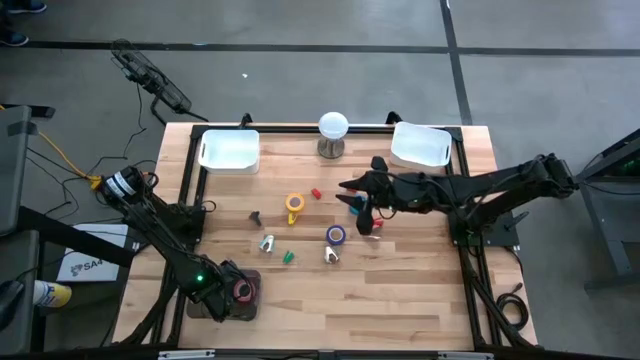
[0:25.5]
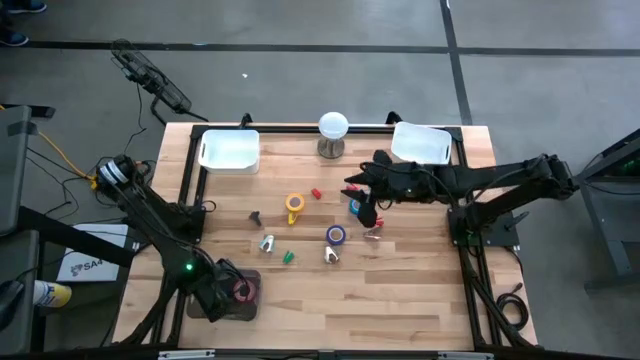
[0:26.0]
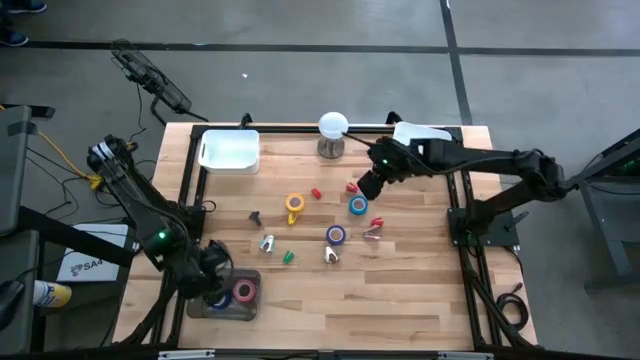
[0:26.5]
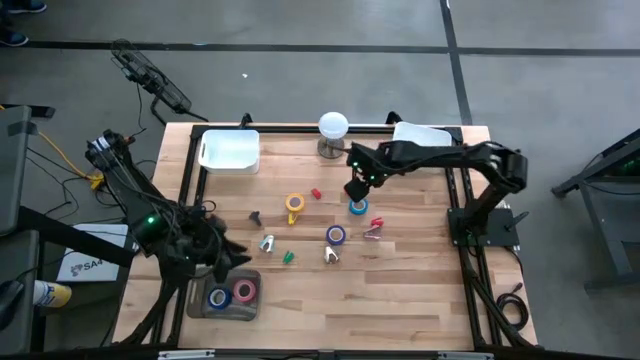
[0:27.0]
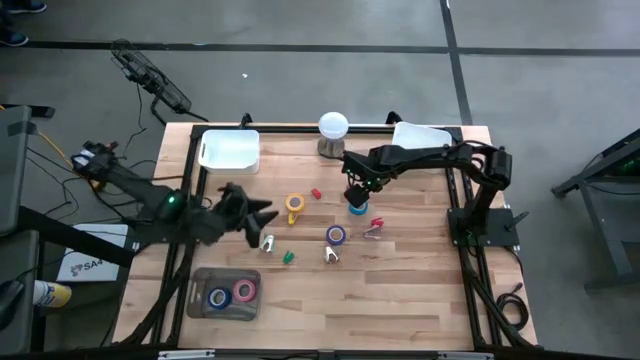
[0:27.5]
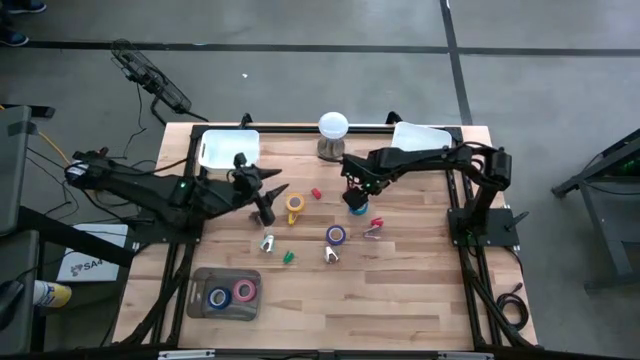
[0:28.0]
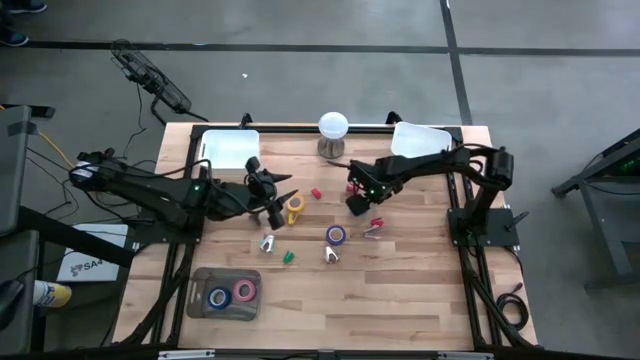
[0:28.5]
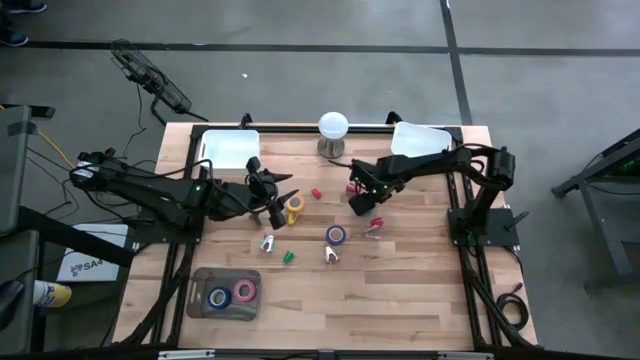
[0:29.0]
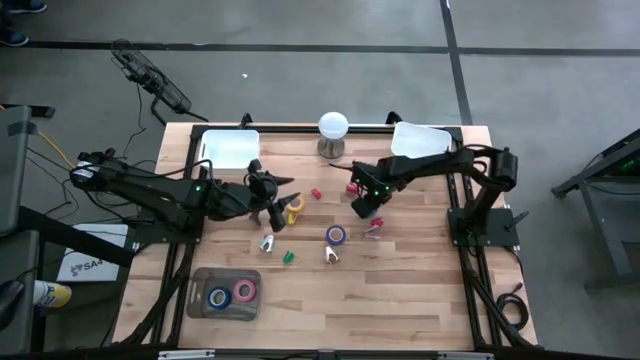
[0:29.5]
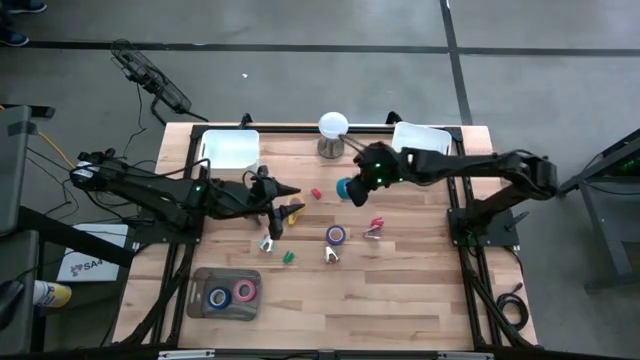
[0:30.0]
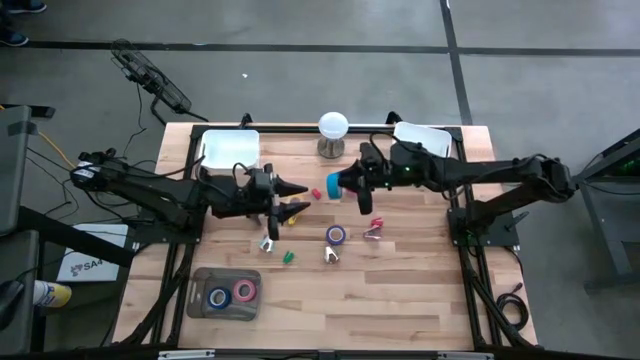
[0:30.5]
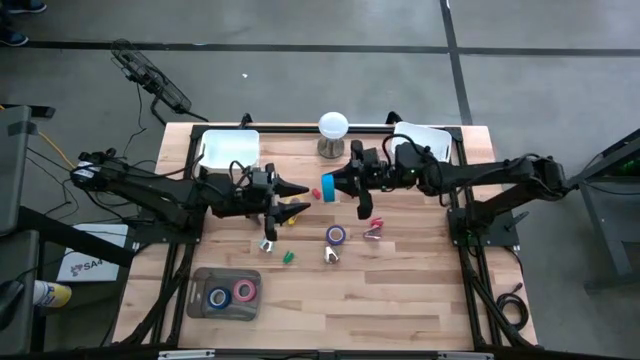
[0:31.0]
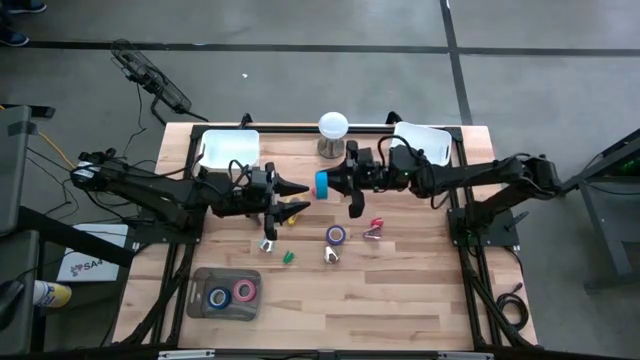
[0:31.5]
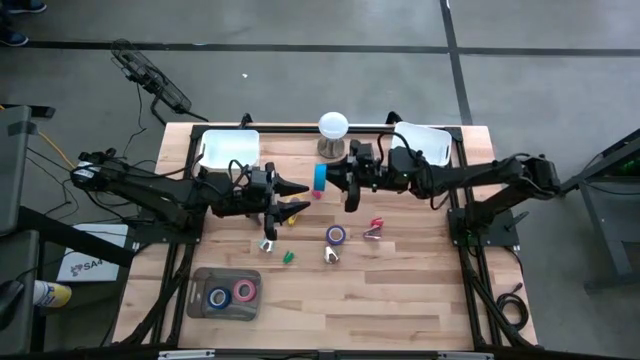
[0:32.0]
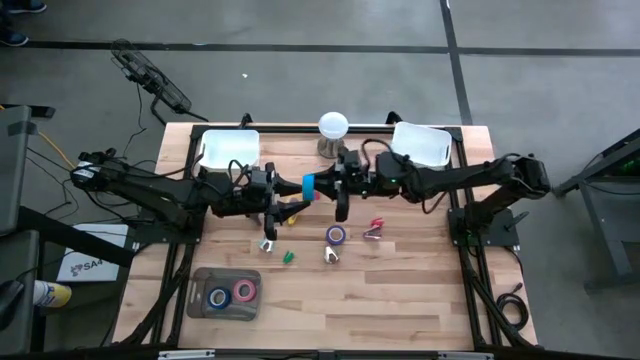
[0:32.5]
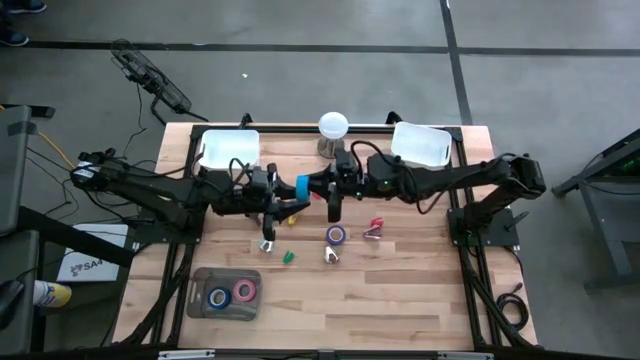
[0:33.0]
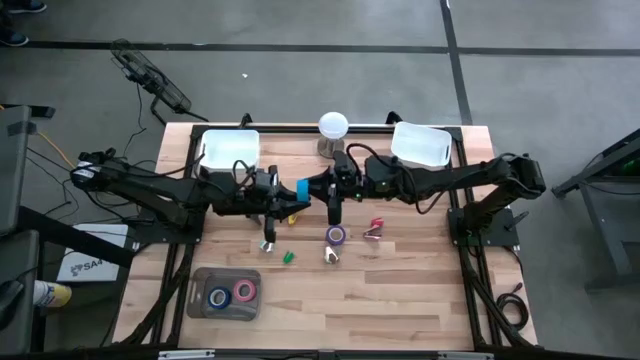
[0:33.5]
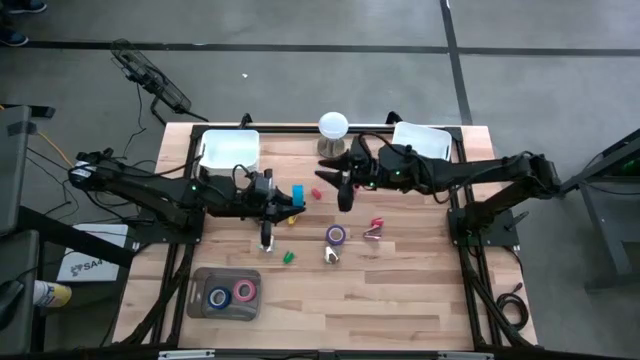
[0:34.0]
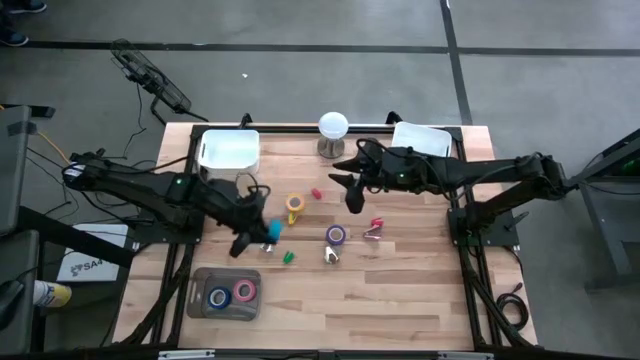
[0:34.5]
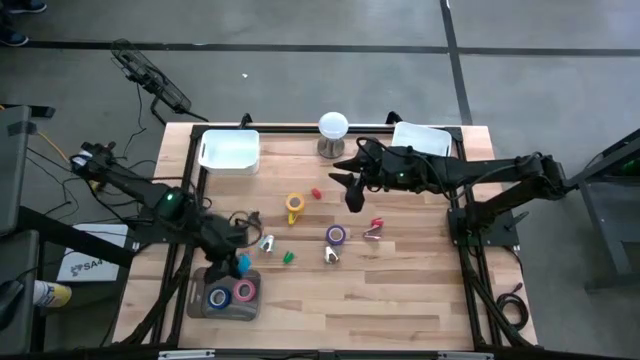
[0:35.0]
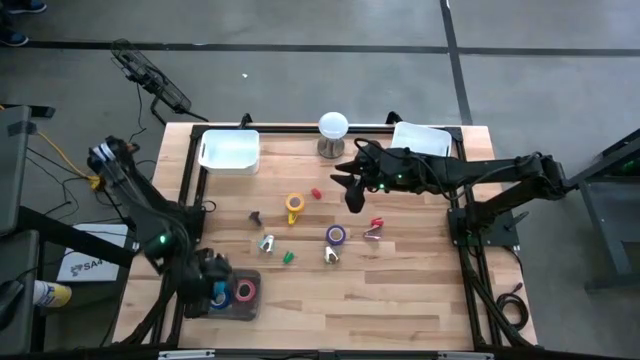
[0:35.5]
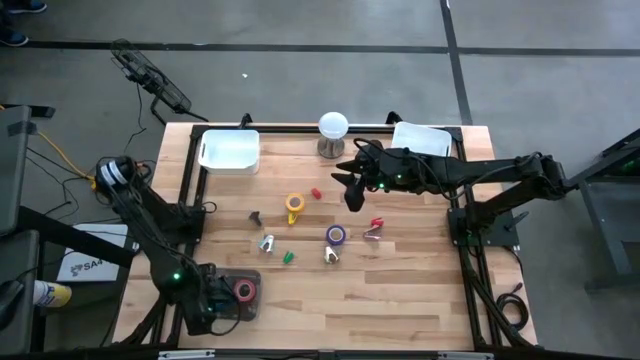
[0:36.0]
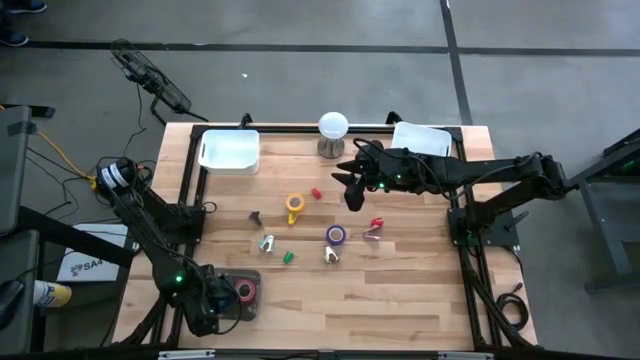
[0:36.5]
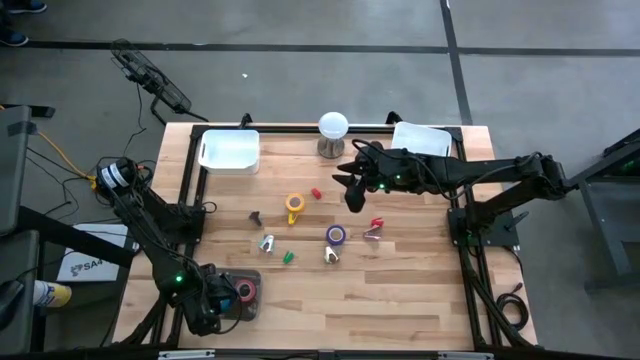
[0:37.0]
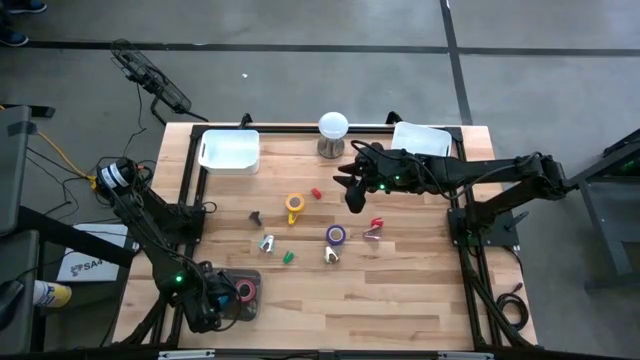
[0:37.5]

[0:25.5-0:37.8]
Task: Pick and place Stapler, Stapler remover, tape
Put the light blue tape into the black bin

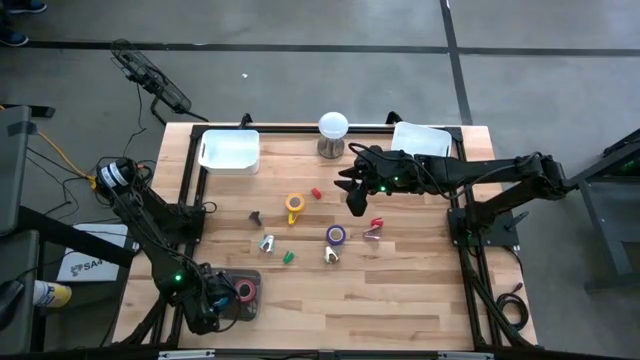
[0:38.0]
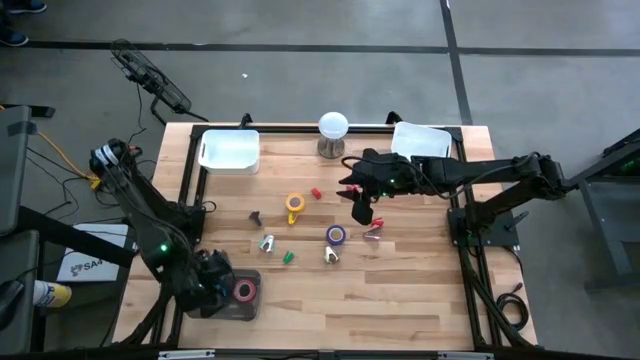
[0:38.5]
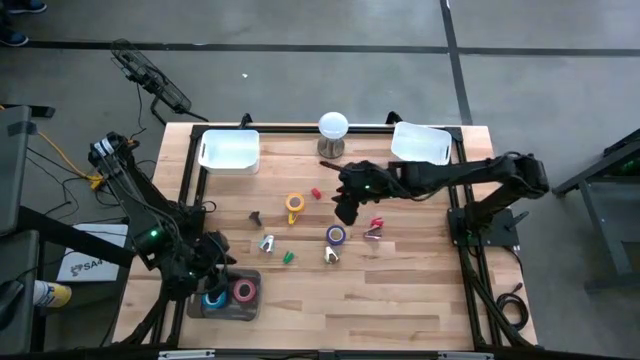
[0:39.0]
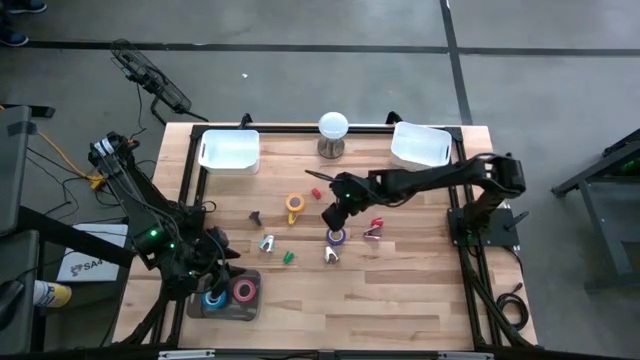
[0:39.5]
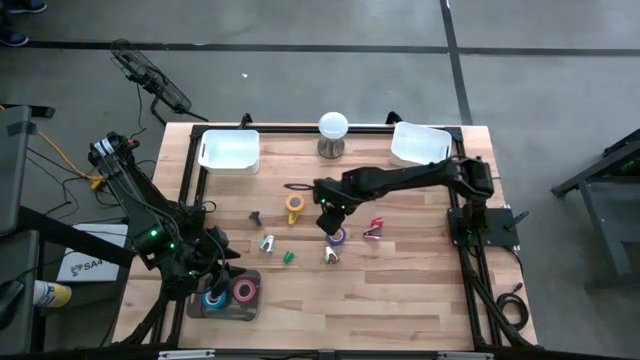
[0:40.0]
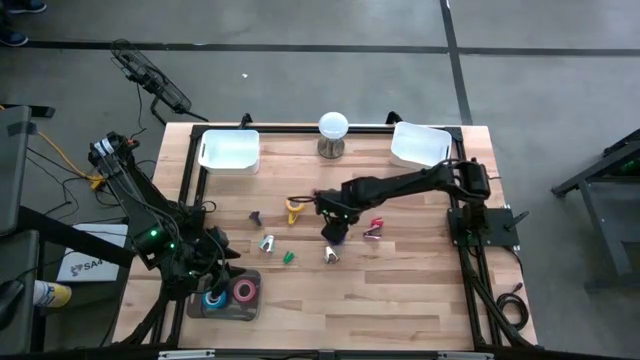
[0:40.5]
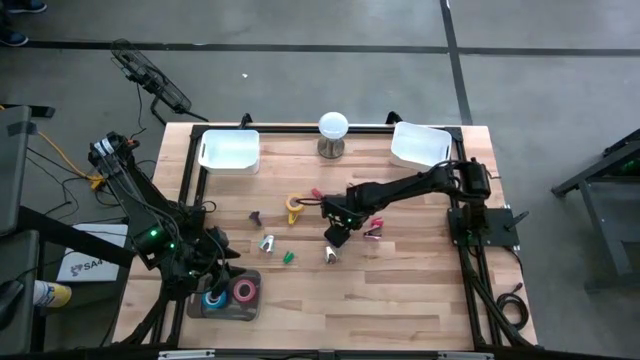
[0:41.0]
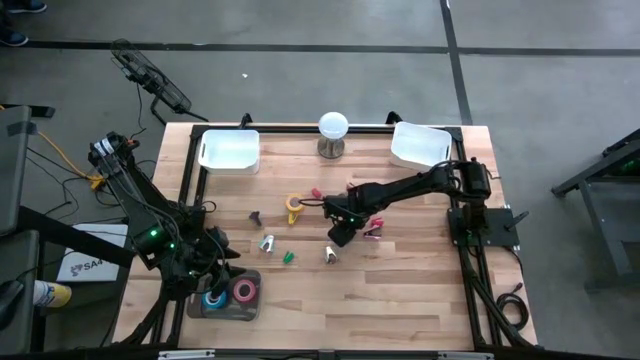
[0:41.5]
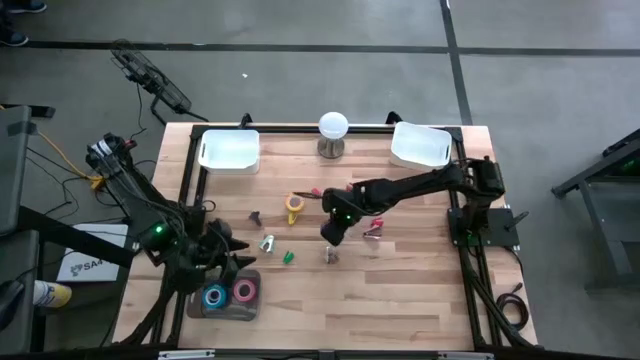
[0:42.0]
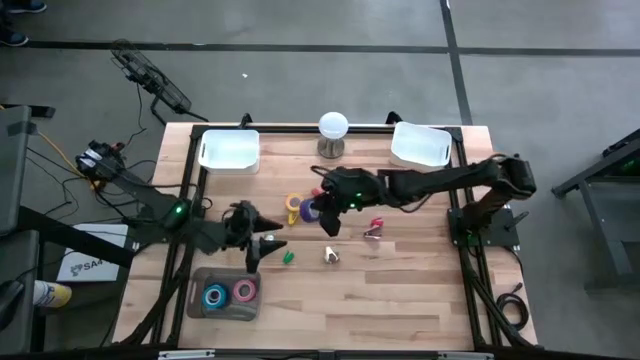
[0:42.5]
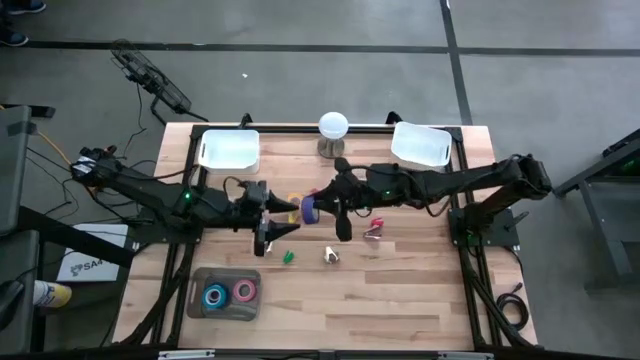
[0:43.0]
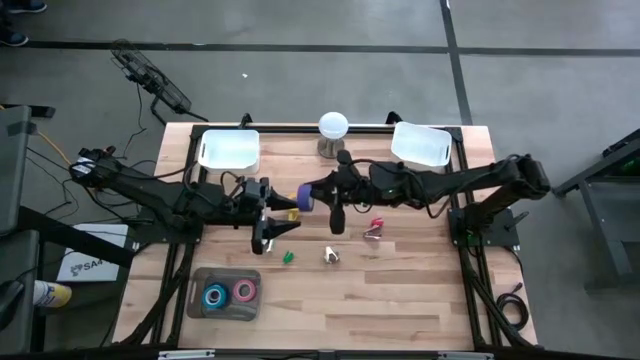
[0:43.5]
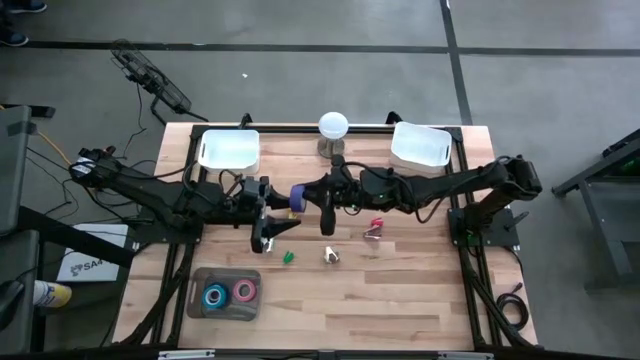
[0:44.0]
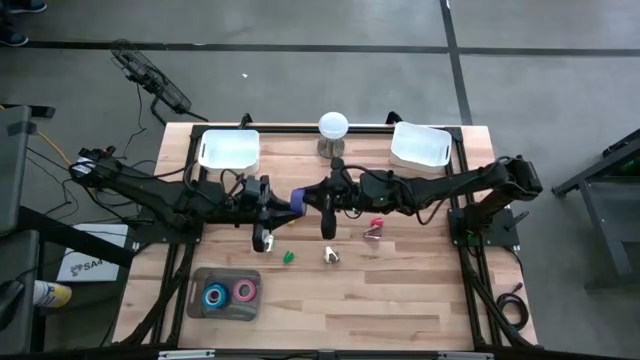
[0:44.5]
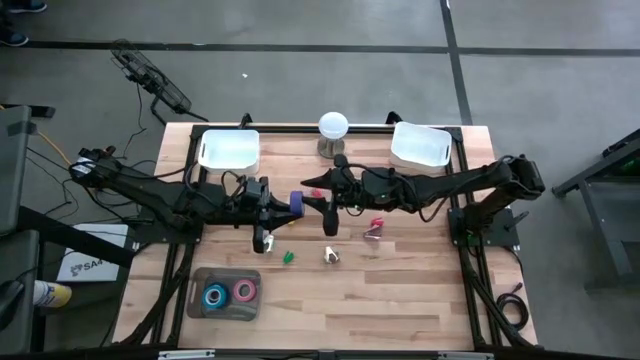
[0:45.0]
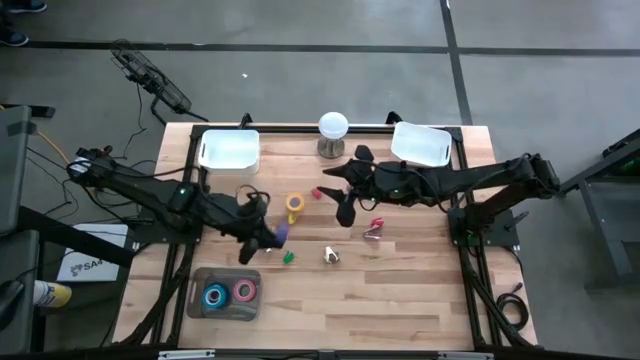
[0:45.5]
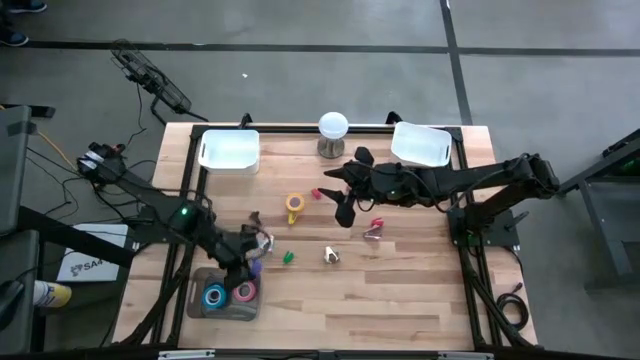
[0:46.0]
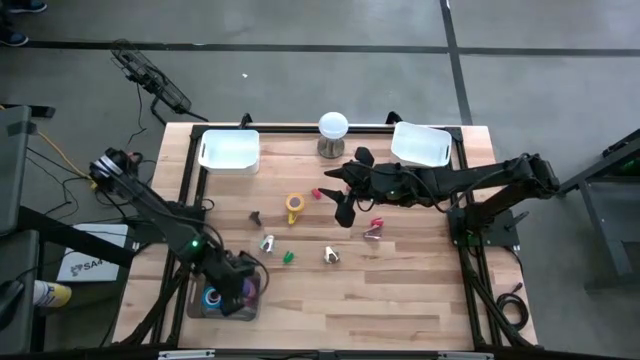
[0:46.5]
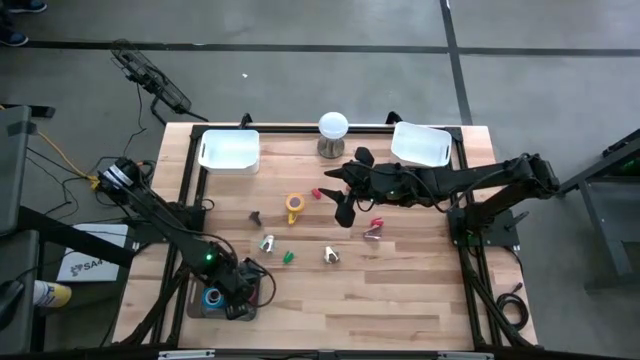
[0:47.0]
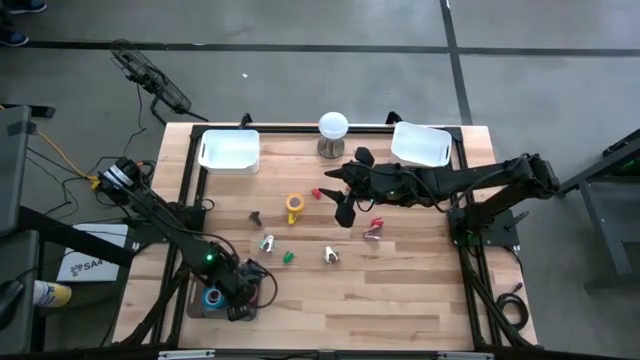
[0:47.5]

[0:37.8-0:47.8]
Put the dark blue tape into the black bin
